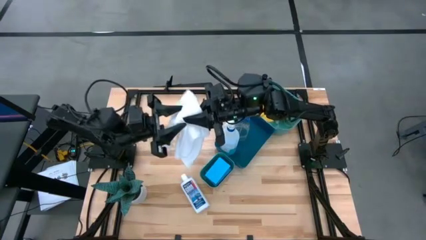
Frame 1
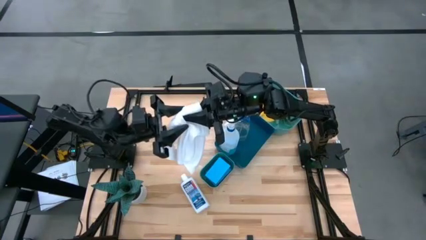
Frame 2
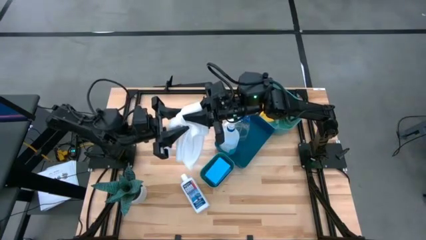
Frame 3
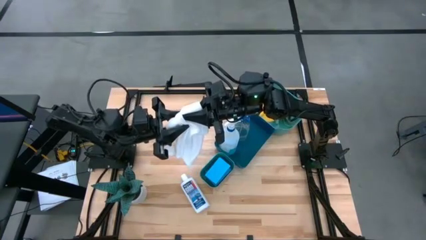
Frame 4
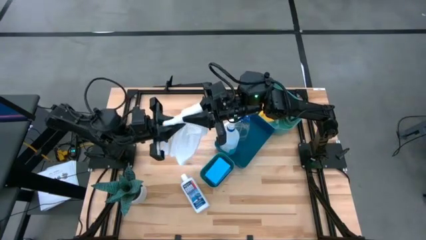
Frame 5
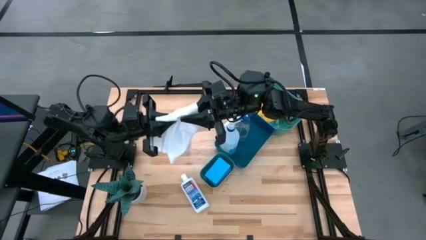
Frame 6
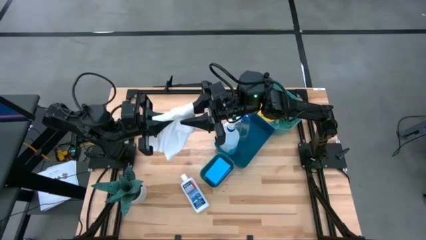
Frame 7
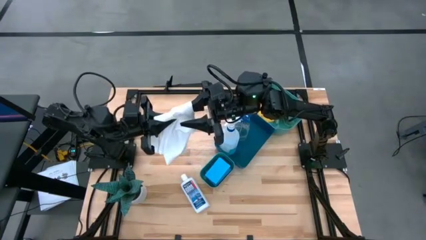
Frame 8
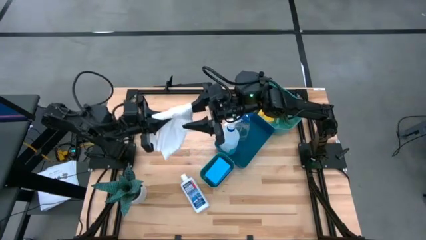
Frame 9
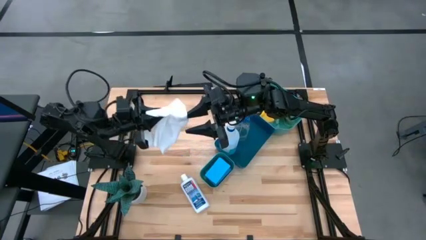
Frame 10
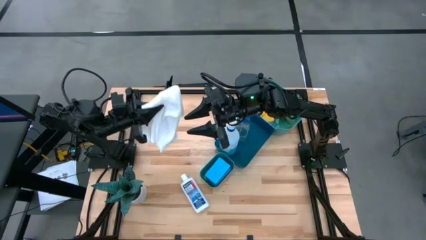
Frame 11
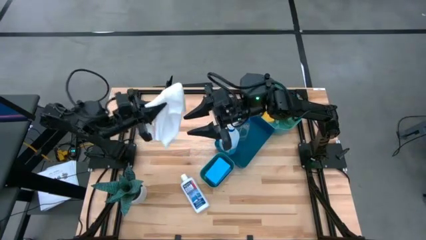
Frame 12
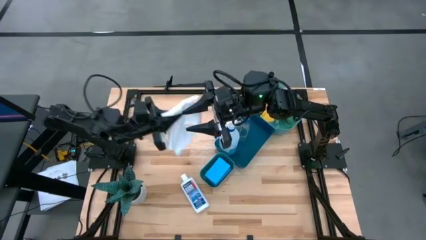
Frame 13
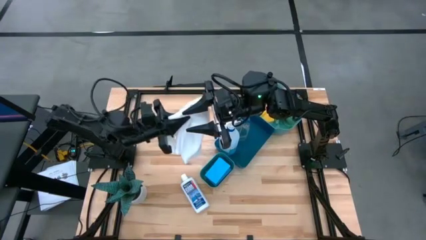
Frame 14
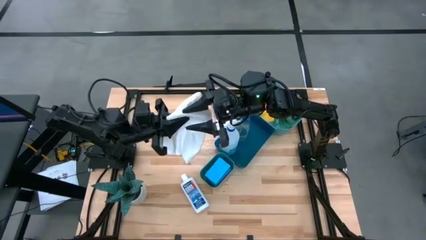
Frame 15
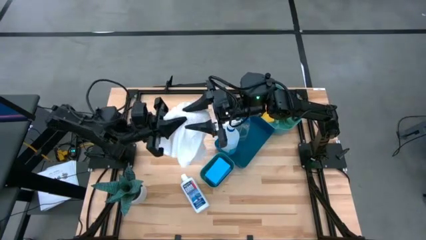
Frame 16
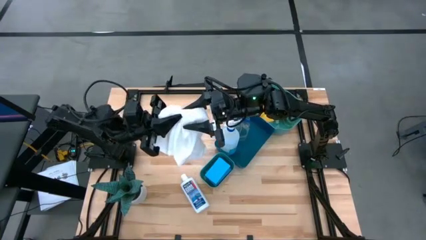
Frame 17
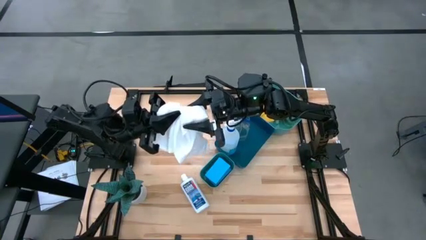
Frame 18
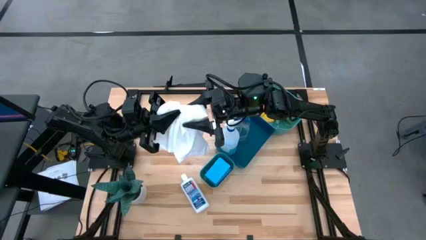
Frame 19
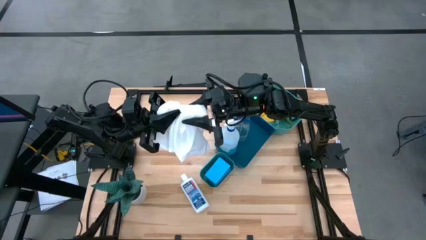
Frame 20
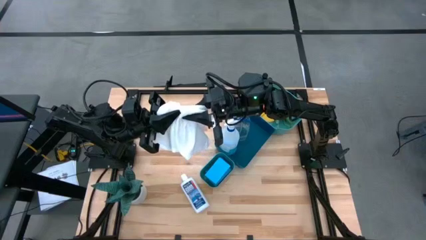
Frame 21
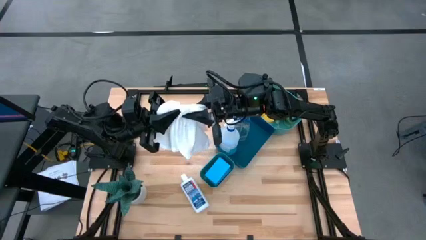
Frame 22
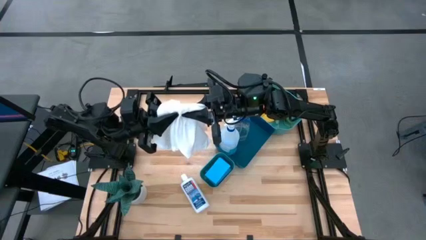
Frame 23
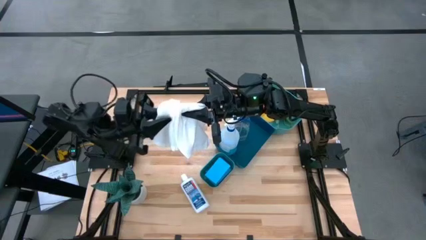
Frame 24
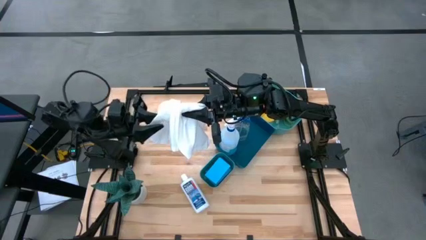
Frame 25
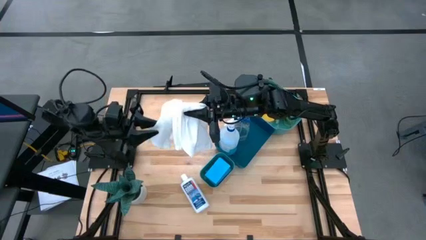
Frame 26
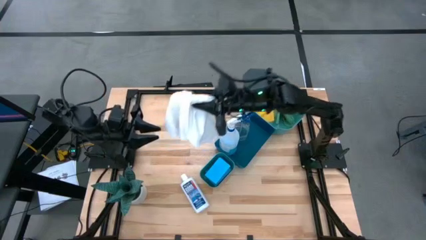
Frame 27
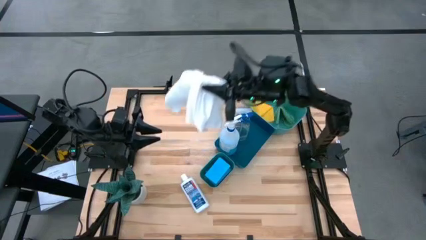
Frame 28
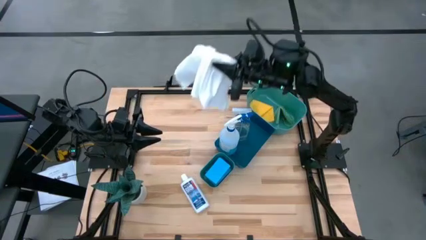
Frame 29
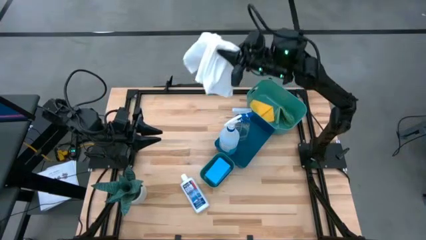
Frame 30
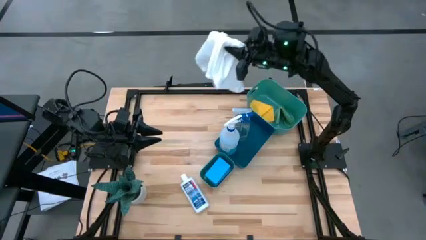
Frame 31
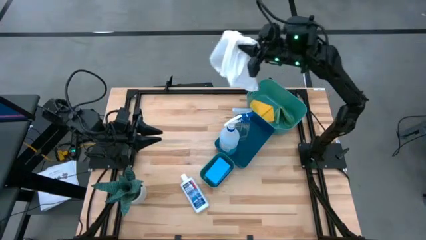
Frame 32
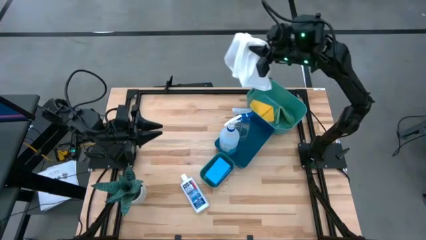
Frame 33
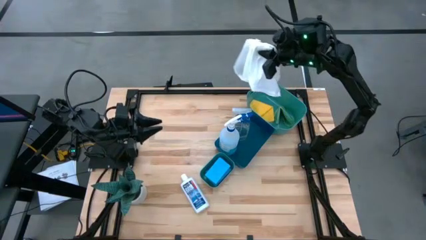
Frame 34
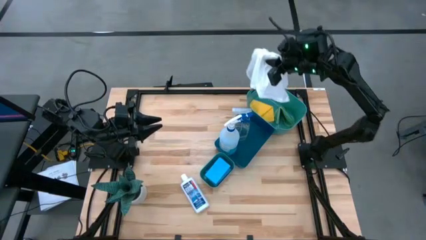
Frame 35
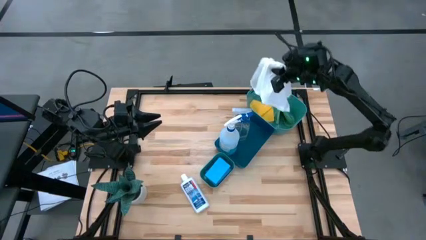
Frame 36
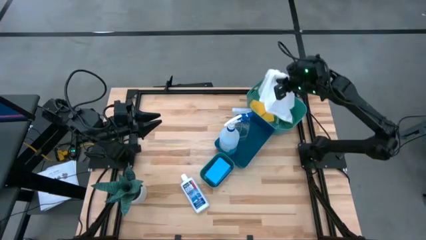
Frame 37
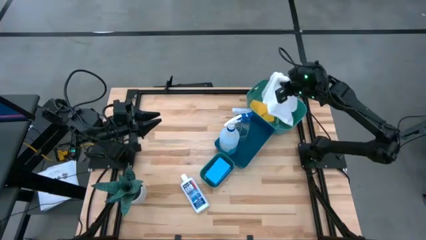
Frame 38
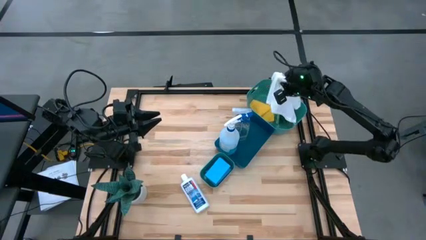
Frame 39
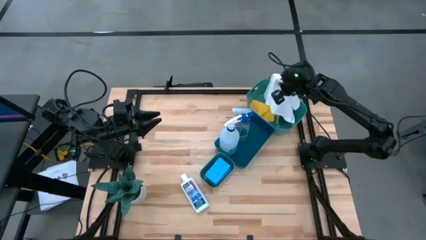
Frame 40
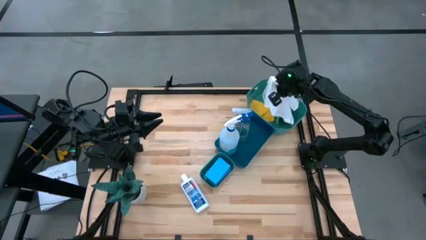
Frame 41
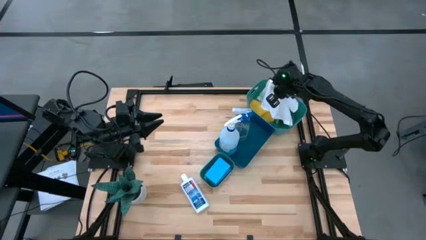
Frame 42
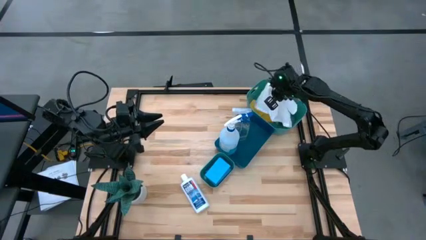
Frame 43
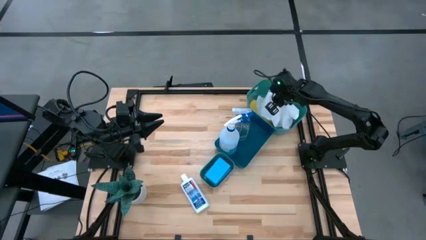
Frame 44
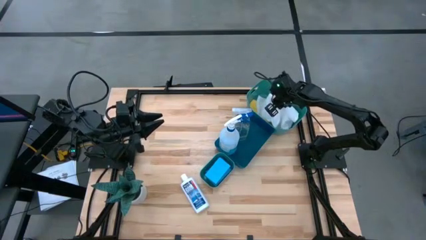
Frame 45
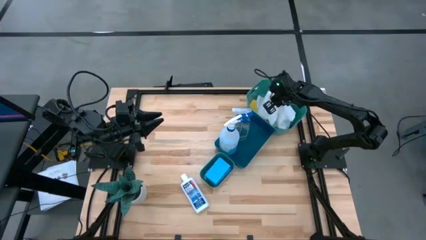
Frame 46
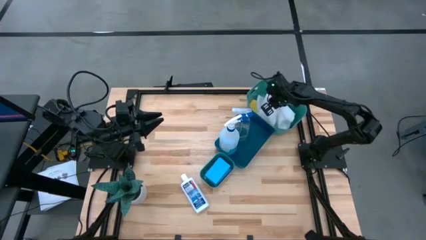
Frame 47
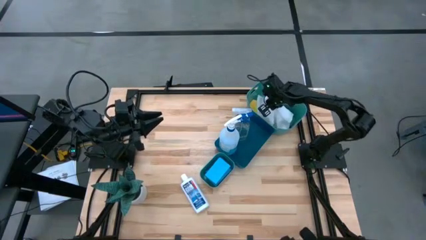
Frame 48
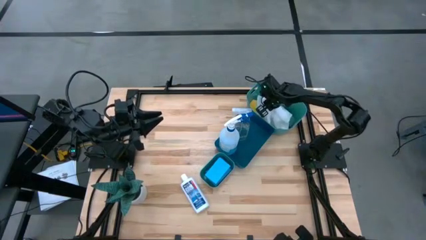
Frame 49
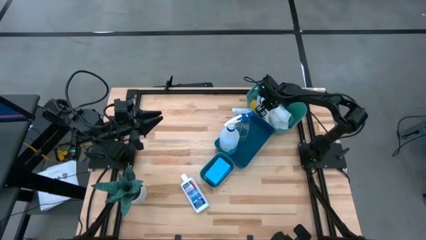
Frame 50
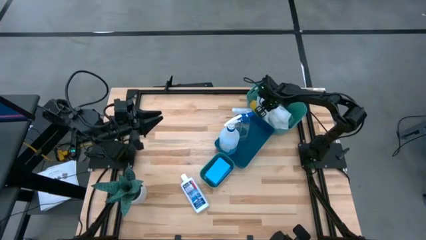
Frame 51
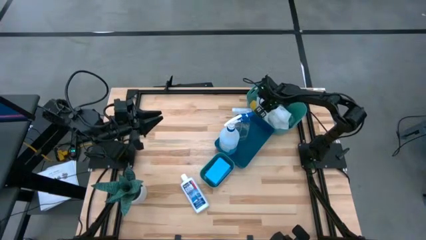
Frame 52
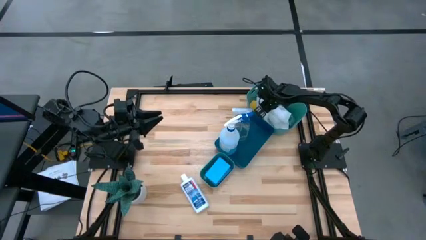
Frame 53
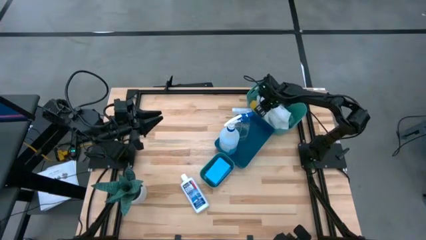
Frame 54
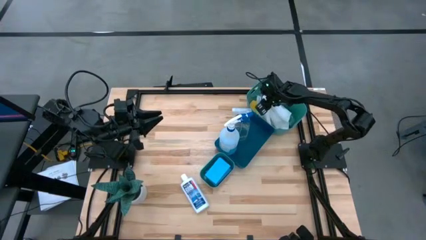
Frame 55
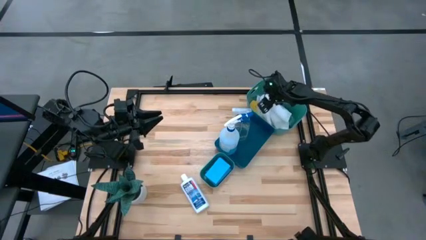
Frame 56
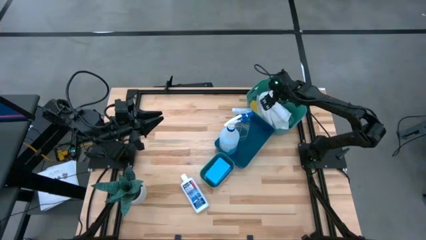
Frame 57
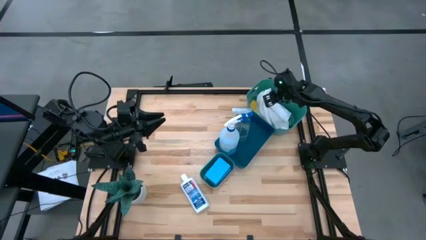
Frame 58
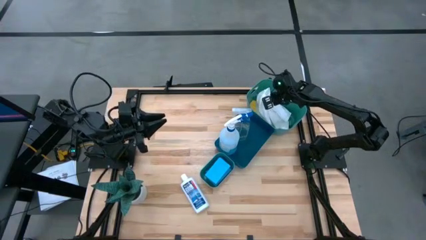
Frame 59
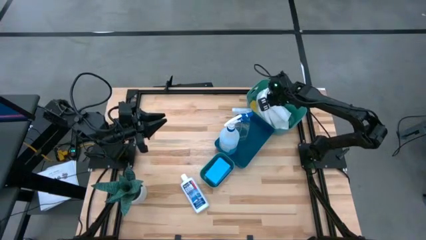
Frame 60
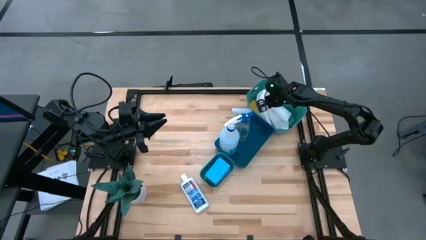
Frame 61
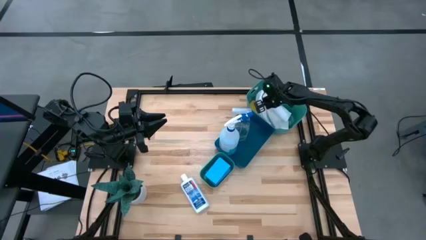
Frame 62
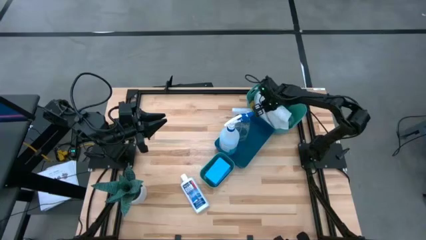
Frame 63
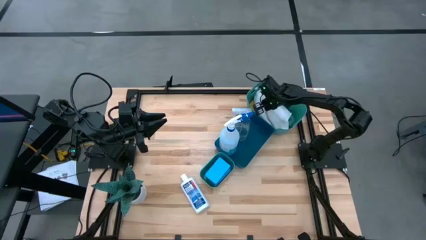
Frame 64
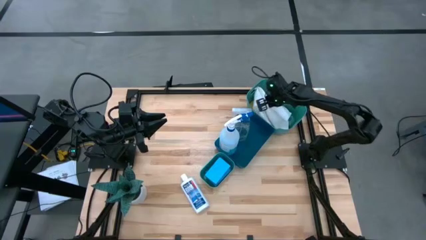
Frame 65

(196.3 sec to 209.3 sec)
Task: Pick & Place Kitchen Items
Put the white microfiber cloth into the top green bin

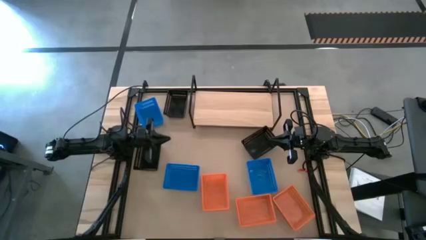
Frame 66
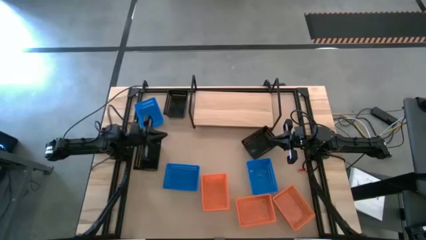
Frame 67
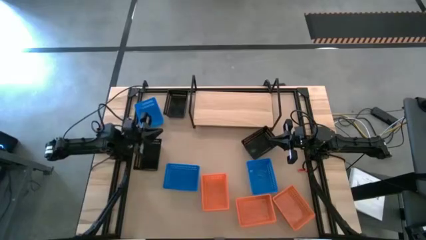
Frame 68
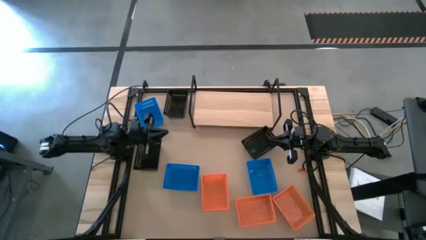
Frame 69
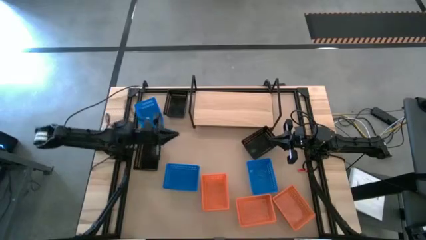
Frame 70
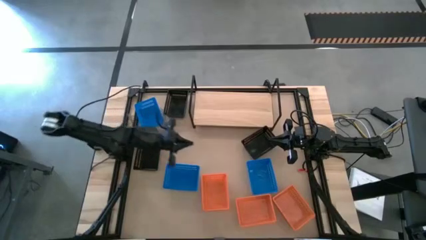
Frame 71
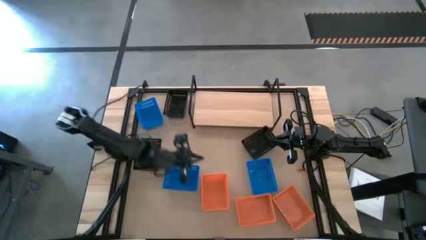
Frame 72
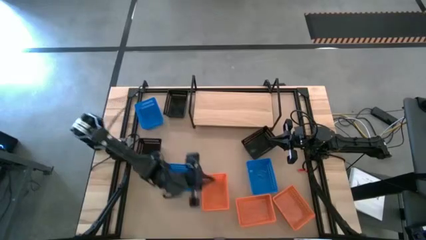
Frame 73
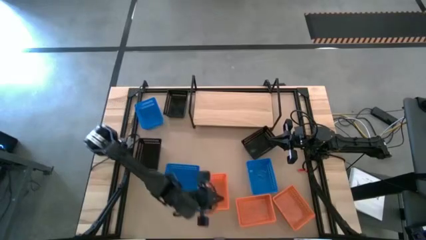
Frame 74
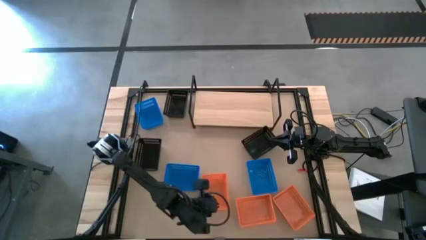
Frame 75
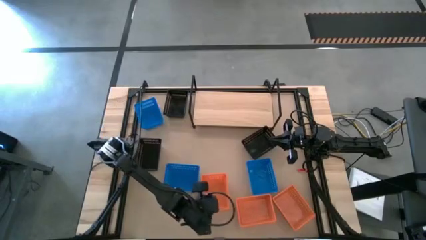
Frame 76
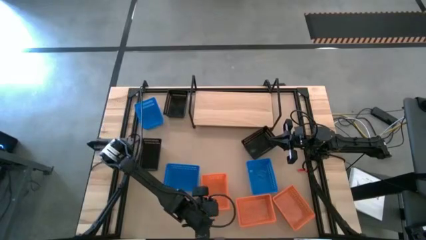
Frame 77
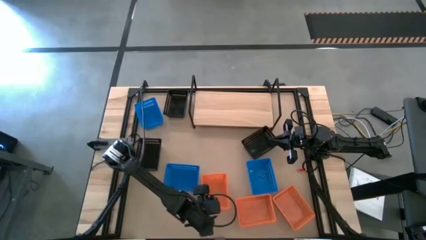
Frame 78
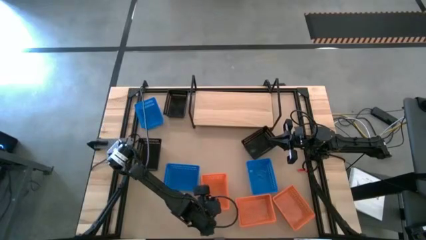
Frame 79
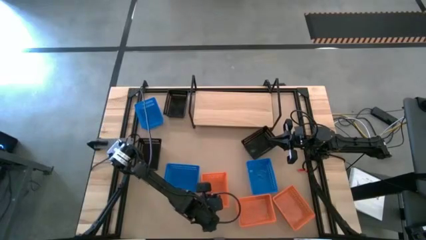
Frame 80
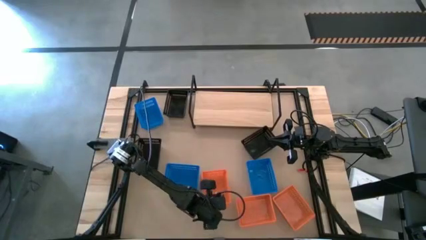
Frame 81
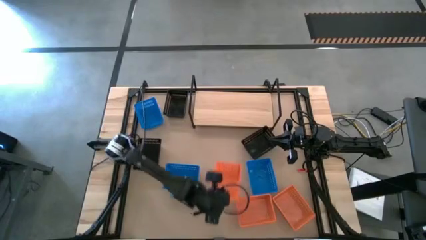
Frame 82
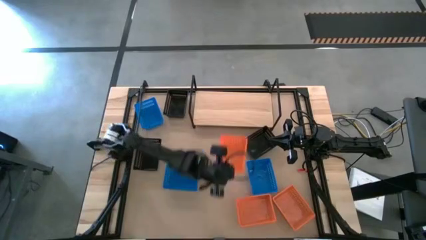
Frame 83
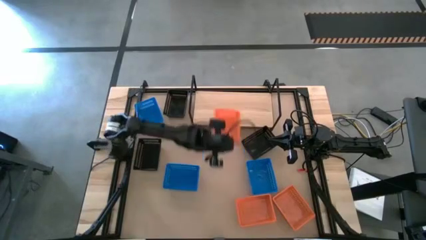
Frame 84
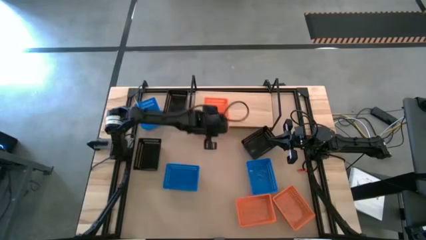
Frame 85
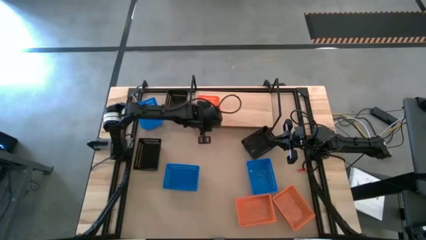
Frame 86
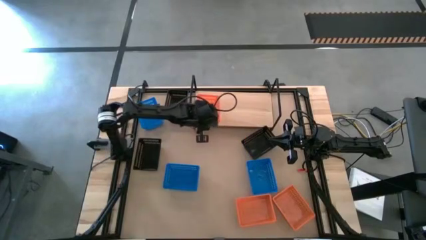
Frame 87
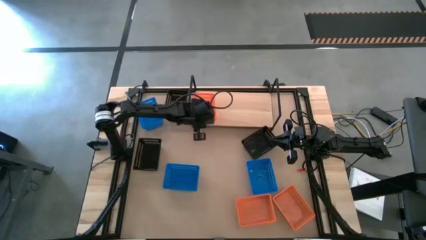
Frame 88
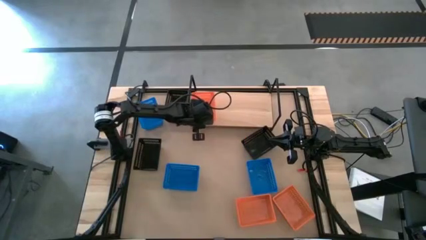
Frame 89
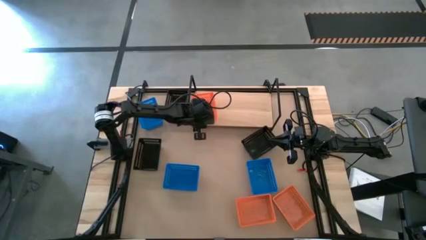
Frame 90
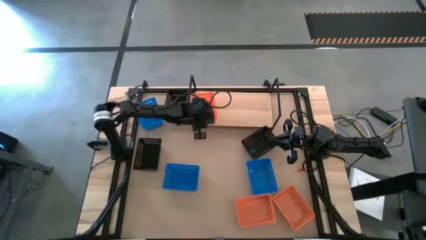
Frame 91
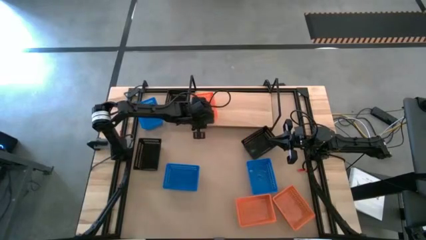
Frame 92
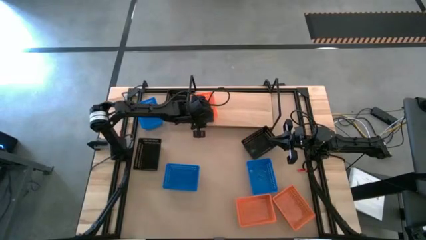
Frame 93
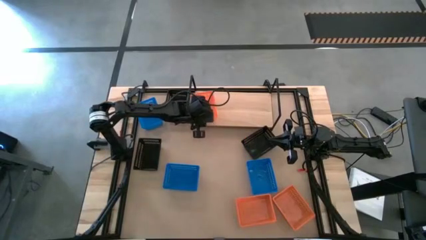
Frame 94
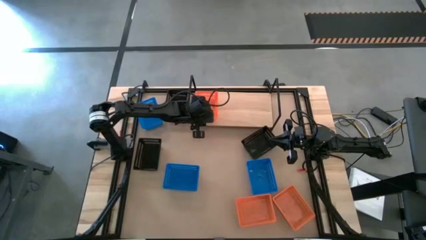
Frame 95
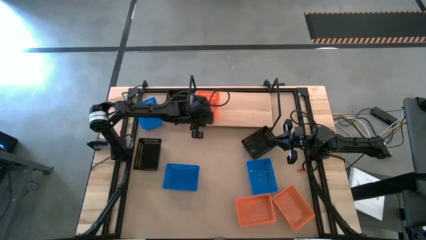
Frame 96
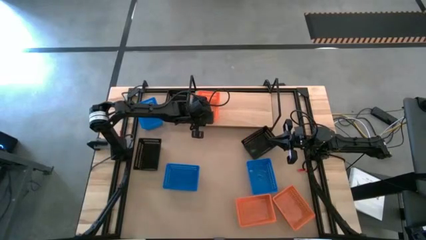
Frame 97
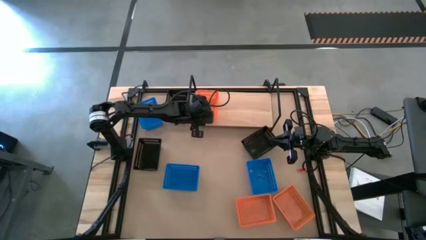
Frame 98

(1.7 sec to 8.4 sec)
Task: Stack baskets on shelf by color
Put the top orange bin on the shelf
